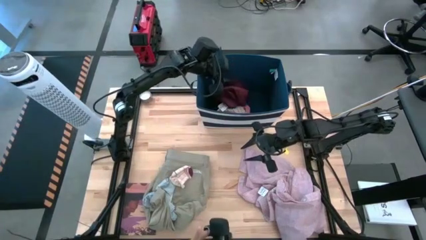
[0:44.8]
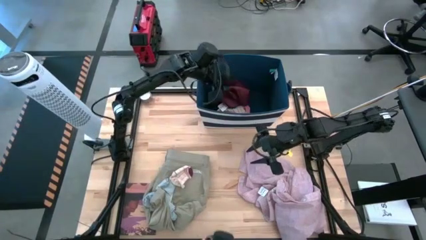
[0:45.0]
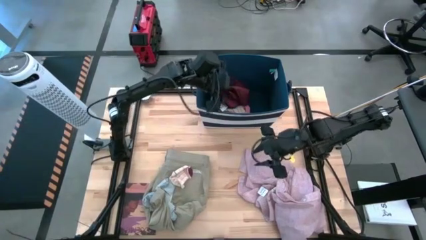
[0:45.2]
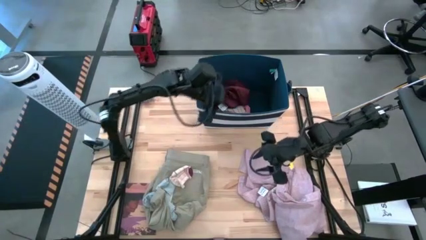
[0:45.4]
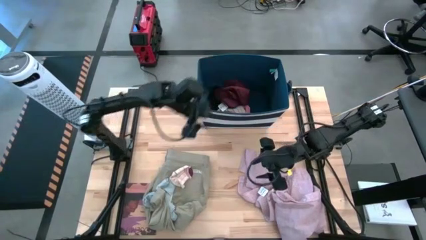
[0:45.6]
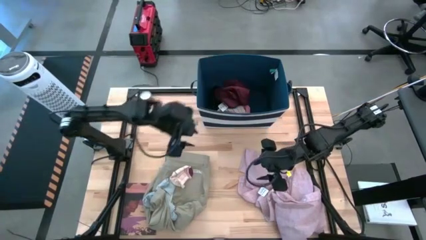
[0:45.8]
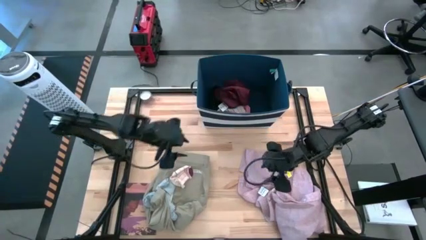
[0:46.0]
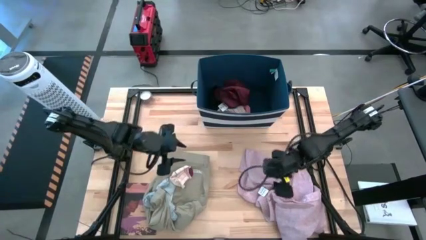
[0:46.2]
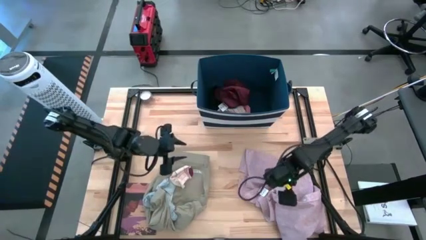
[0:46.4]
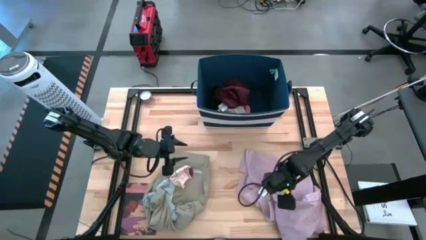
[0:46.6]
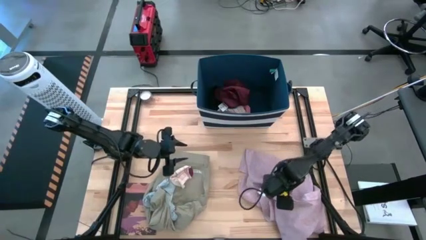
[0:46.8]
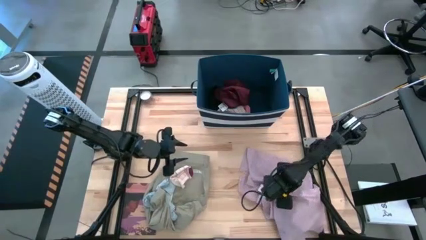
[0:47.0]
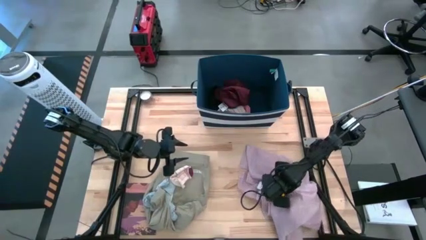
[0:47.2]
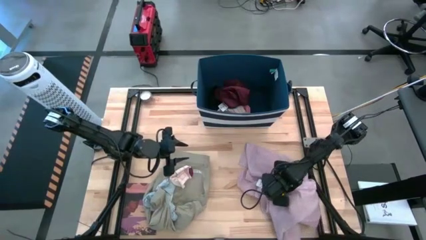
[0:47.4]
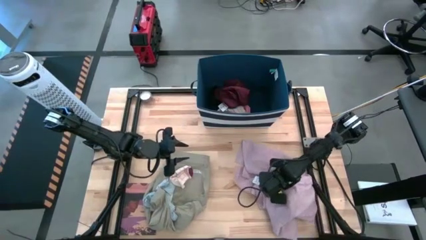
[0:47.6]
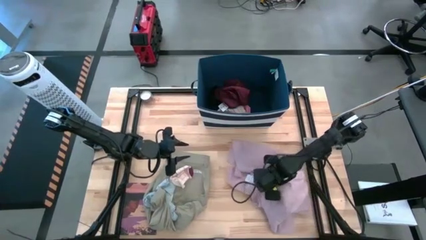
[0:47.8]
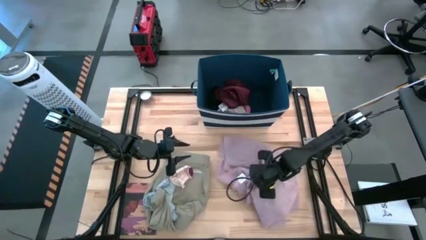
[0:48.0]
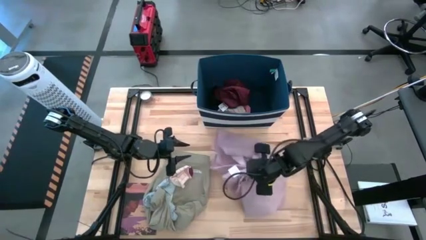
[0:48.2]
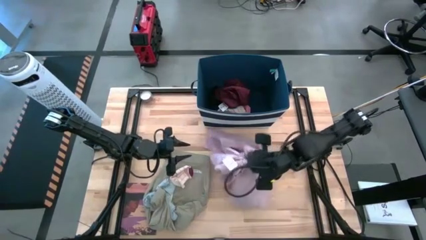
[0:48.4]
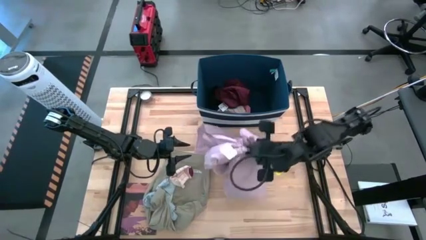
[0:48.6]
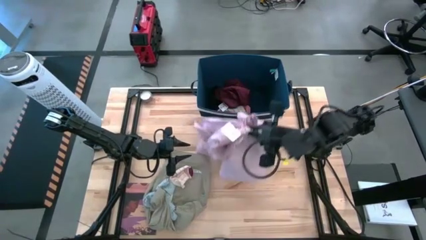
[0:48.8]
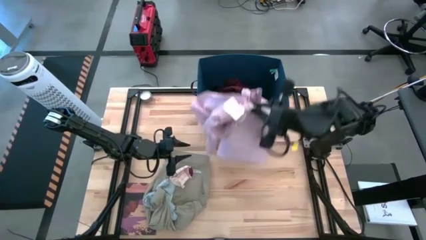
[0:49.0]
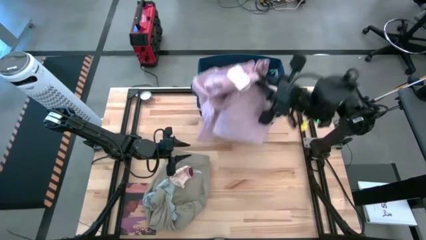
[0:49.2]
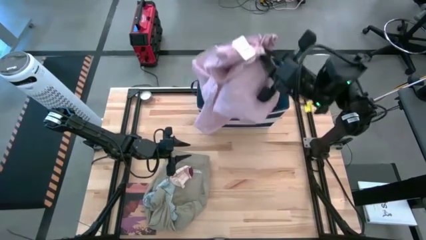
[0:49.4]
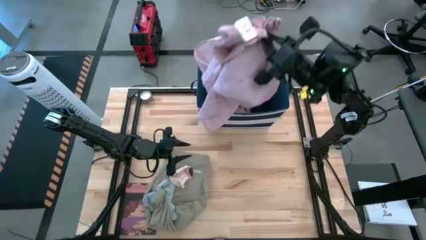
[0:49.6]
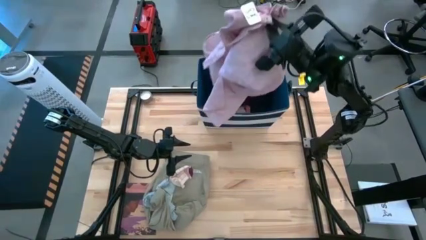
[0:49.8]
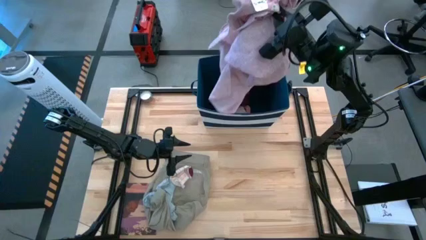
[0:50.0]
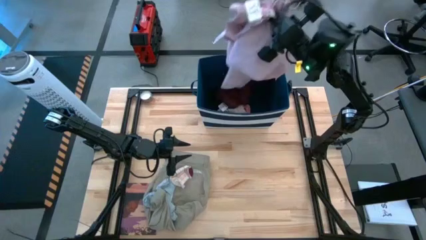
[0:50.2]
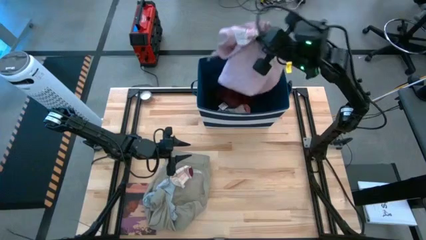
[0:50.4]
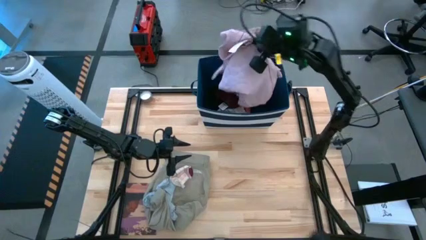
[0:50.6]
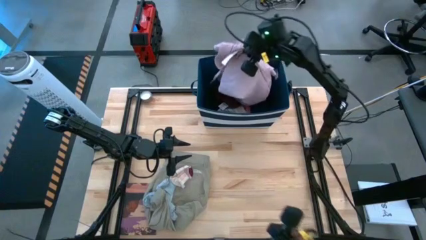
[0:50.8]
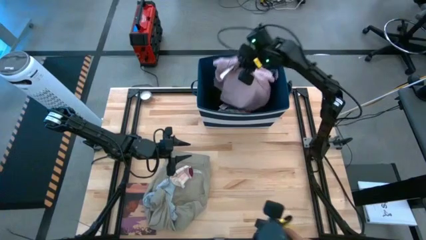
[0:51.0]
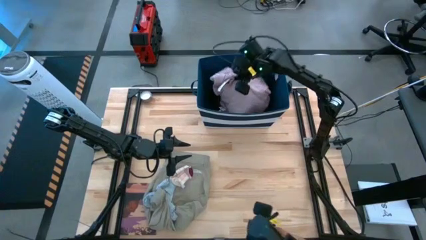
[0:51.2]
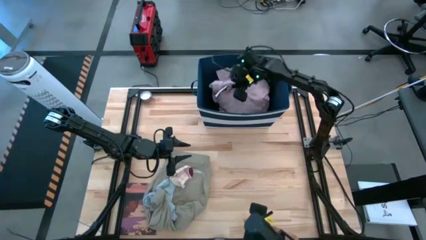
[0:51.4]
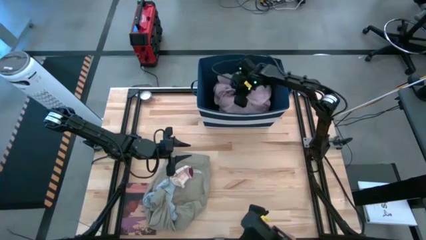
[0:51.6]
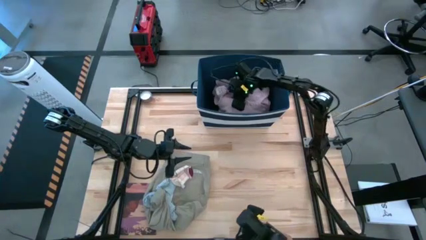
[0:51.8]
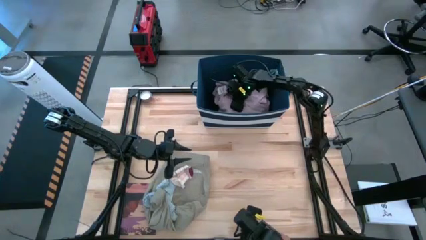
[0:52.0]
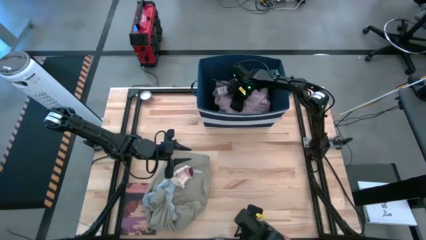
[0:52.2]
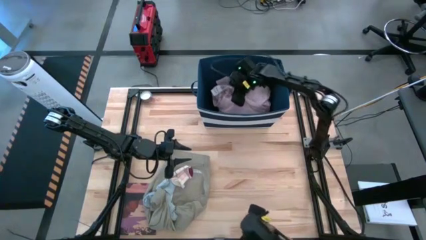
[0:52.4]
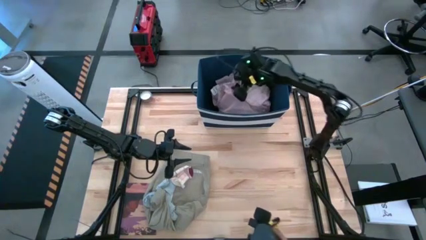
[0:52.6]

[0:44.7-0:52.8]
Task: Sort clothes
Put the pink polo shirt into the laundry bin

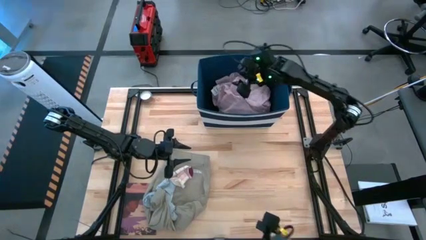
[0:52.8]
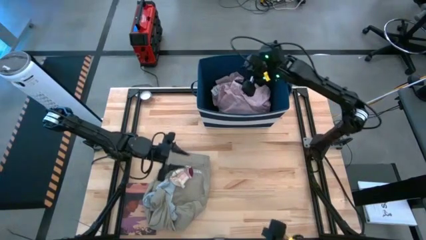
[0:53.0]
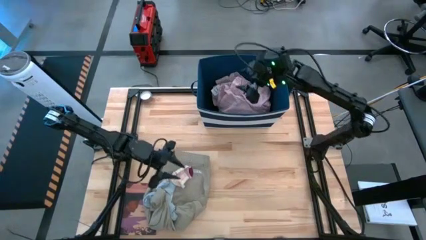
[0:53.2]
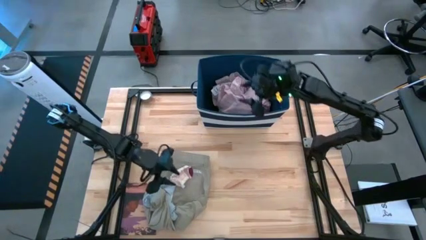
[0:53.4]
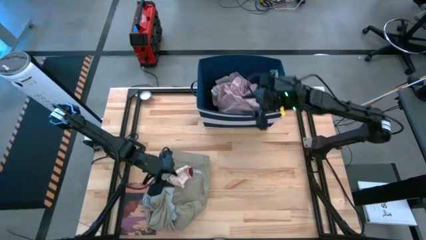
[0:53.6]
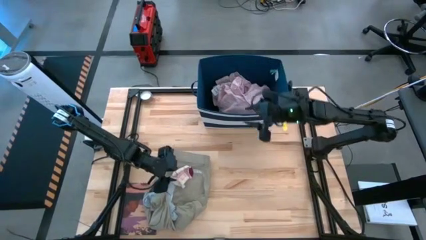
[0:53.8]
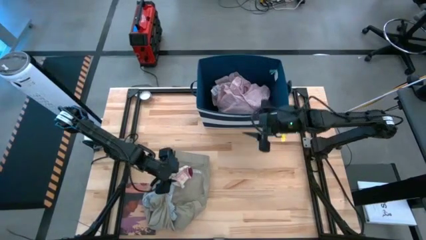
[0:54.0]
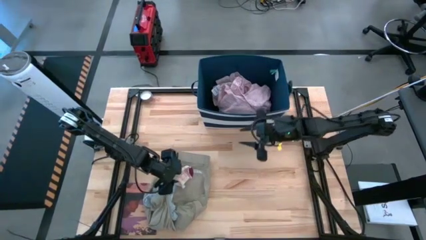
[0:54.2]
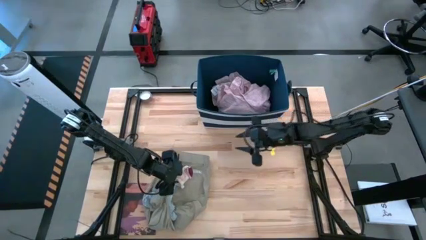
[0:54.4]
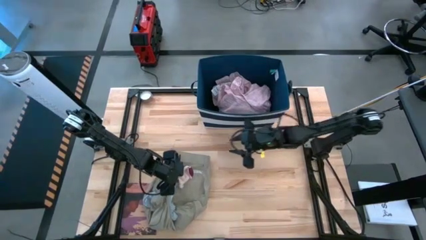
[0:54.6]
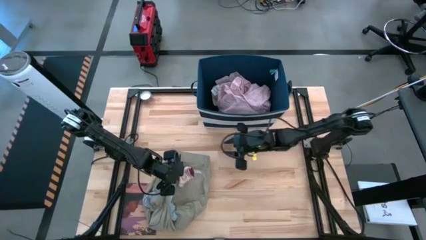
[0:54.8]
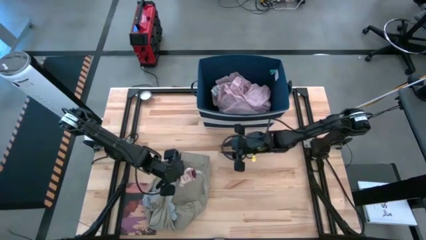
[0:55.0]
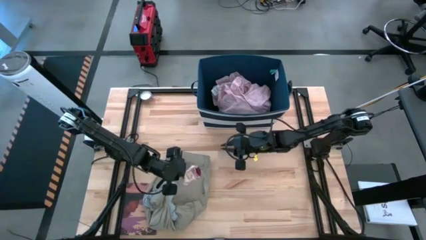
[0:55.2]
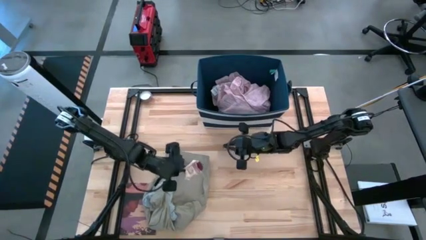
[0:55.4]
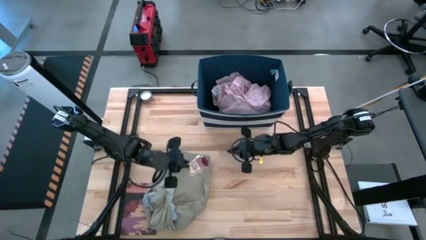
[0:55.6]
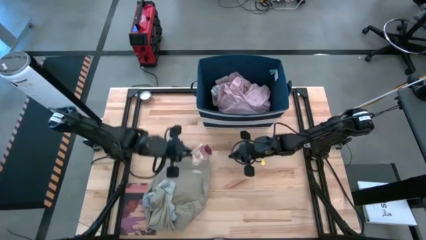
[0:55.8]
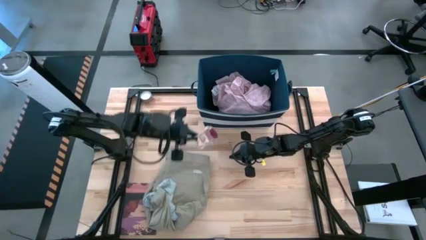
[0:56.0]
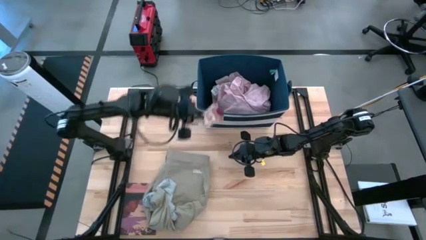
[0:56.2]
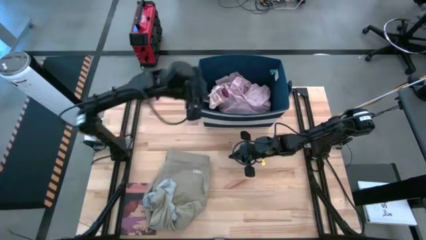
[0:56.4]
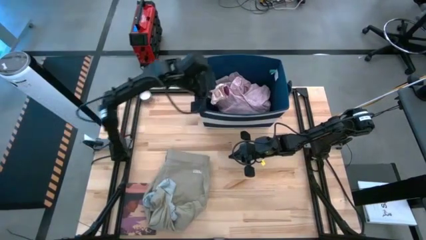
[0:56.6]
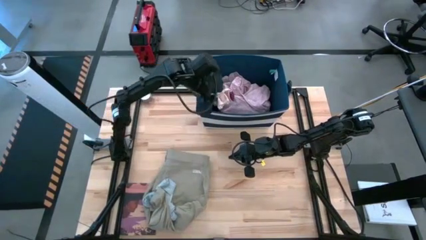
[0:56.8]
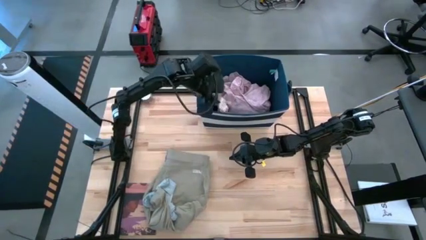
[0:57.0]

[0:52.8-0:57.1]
Put the white patterned sock into the laundry bin

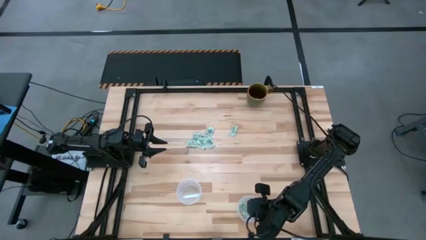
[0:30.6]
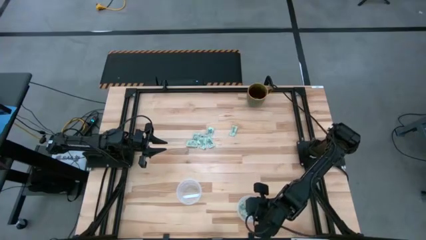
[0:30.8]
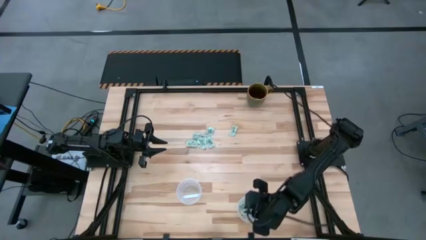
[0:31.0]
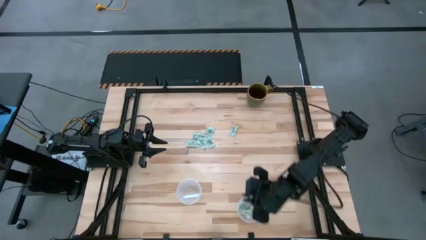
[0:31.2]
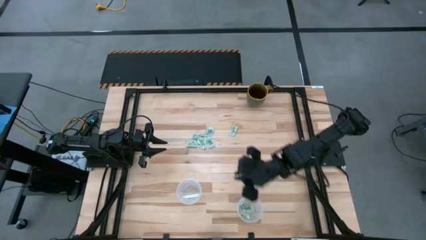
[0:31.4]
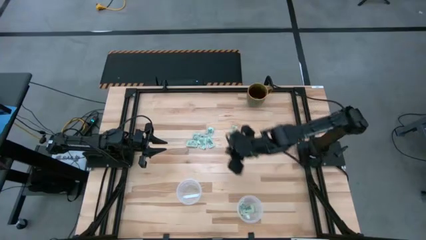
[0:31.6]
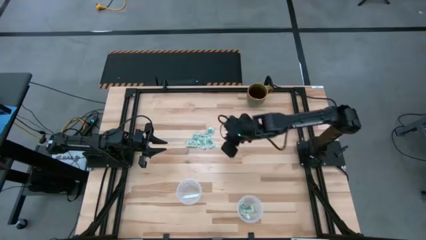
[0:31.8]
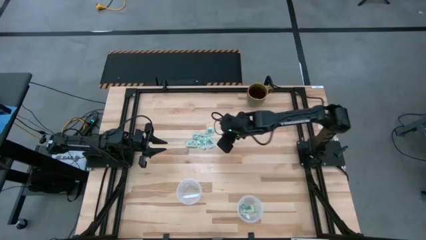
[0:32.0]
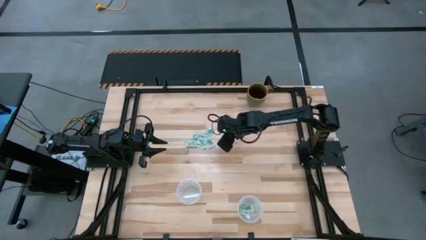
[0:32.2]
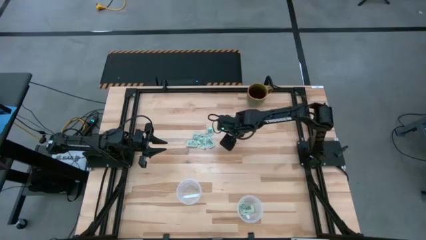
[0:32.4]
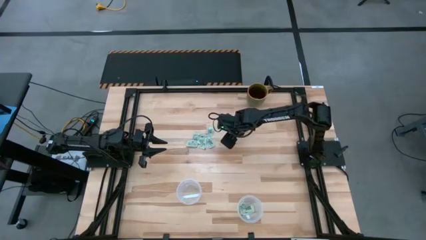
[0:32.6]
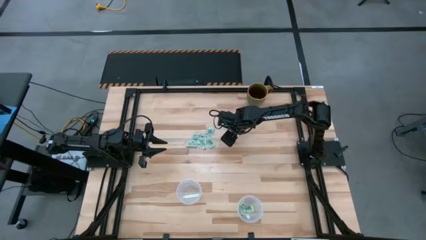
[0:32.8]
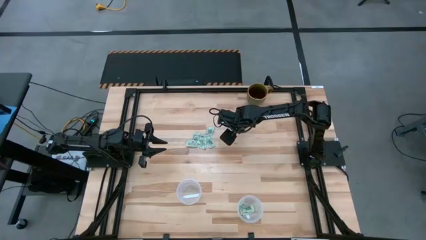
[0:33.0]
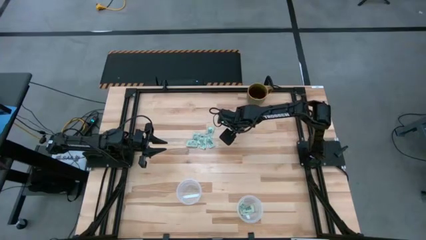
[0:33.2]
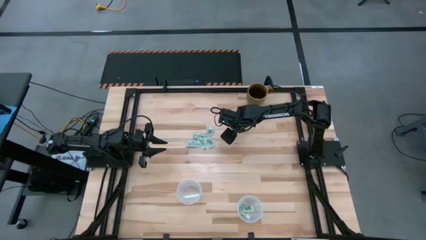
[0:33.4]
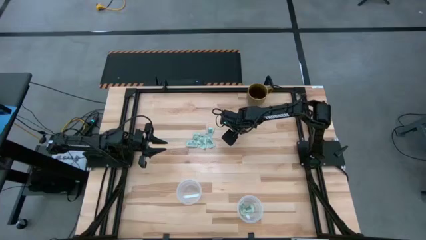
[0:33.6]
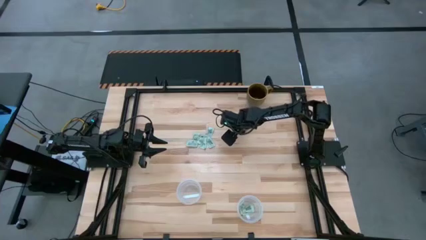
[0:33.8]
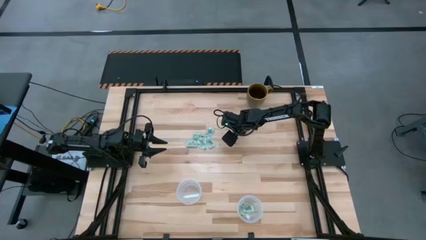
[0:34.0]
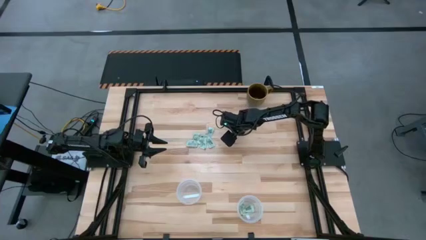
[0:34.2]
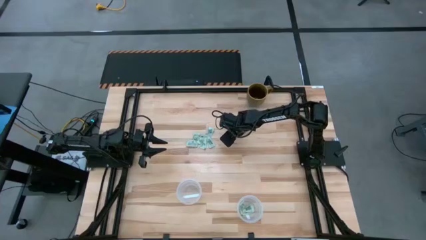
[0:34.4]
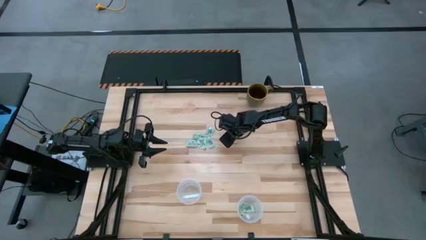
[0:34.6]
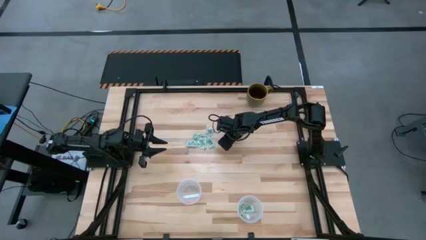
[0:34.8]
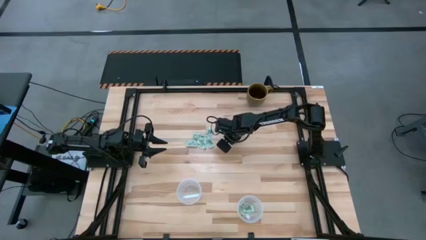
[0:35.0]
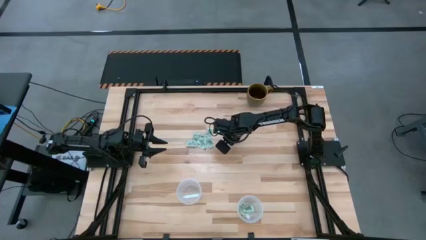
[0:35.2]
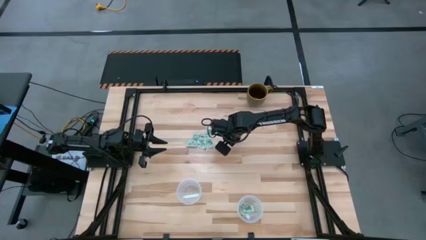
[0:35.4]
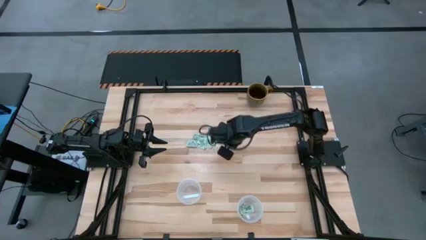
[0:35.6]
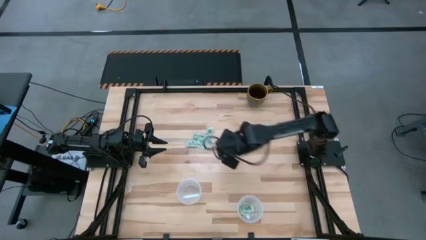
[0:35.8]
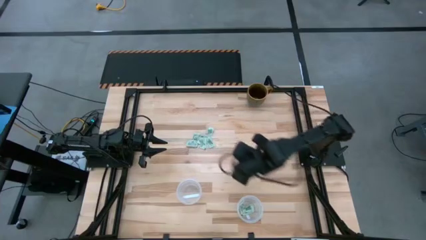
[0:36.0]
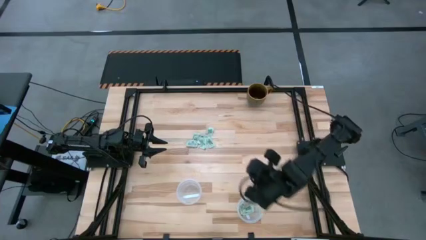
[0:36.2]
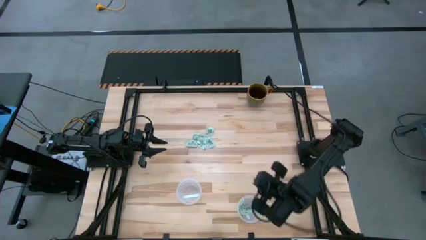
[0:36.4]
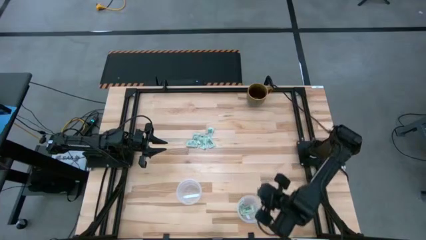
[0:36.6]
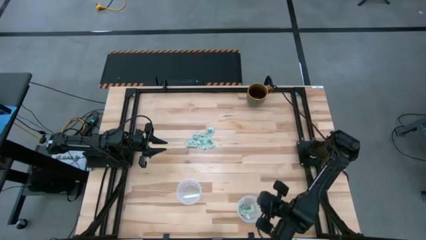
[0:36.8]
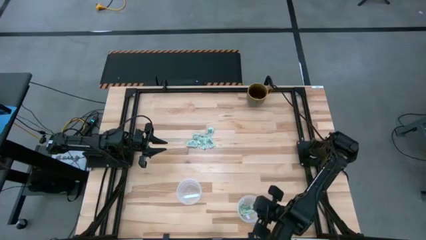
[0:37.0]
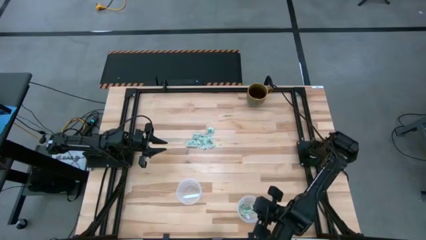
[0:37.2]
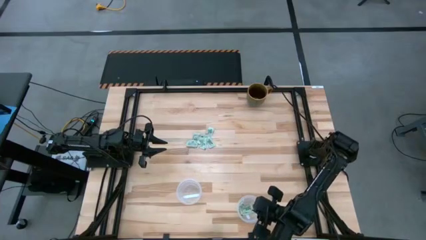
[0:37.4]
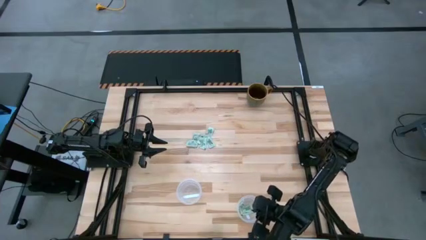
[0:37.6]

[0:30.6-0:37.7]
Task: Pick and place items into bin
Put the stevia packet into the right transparent bin
